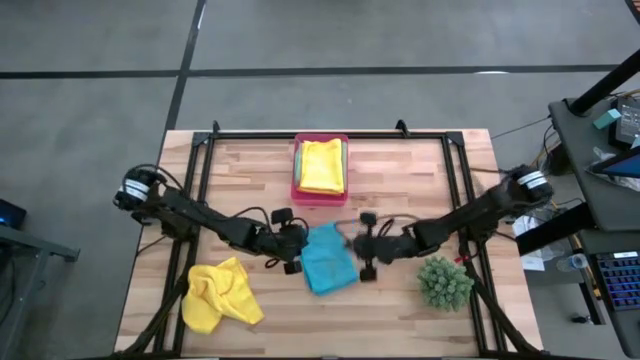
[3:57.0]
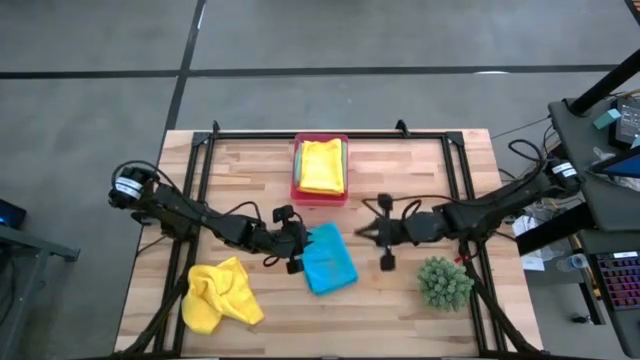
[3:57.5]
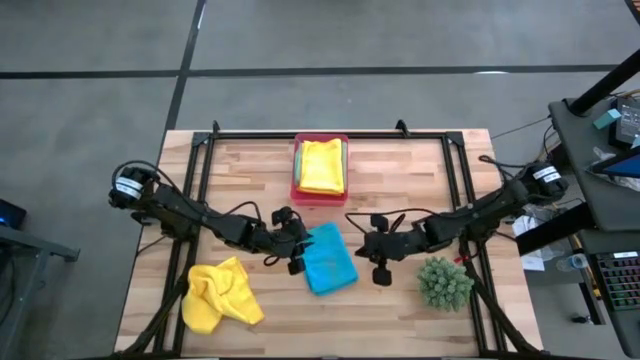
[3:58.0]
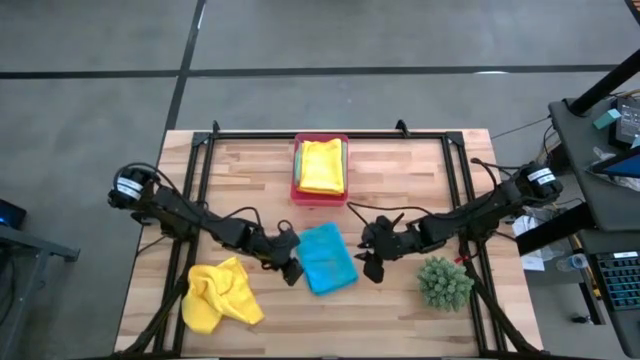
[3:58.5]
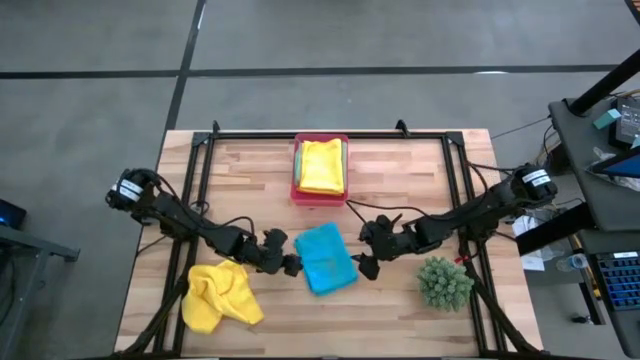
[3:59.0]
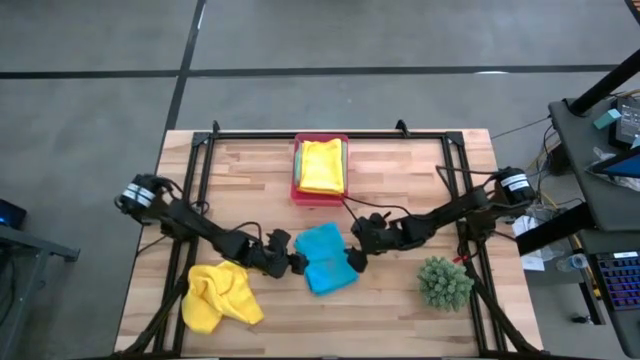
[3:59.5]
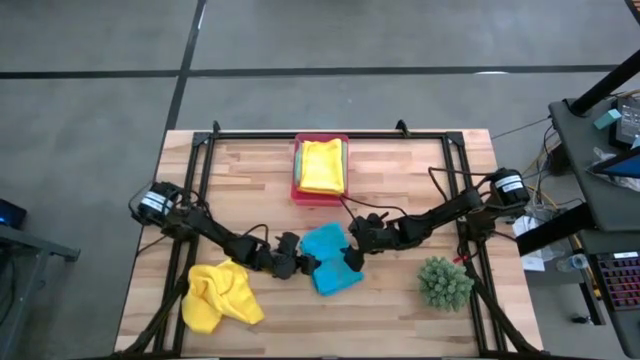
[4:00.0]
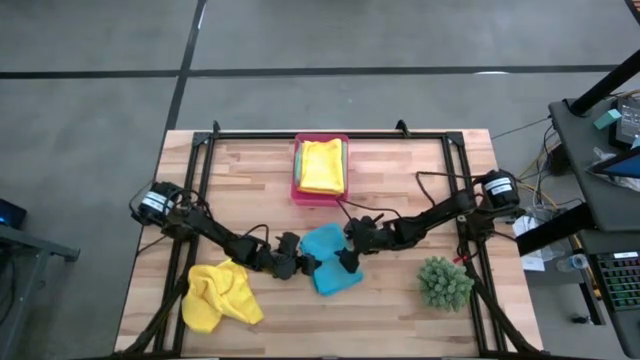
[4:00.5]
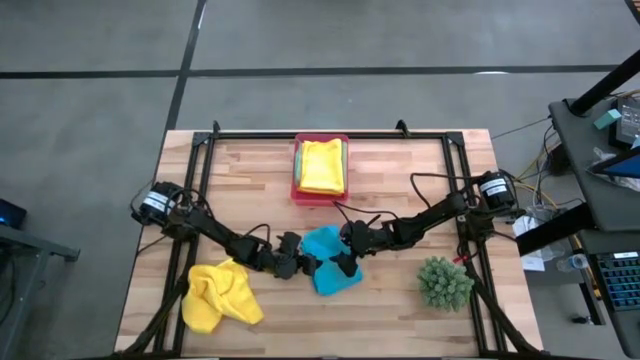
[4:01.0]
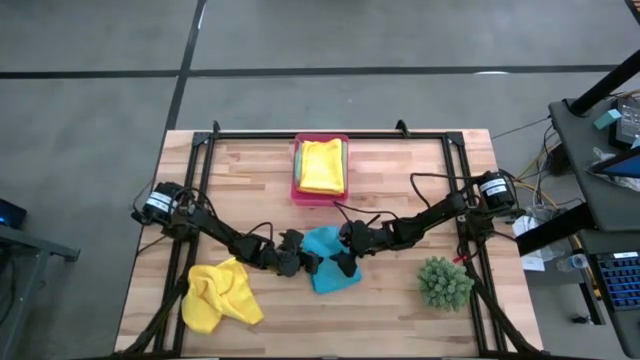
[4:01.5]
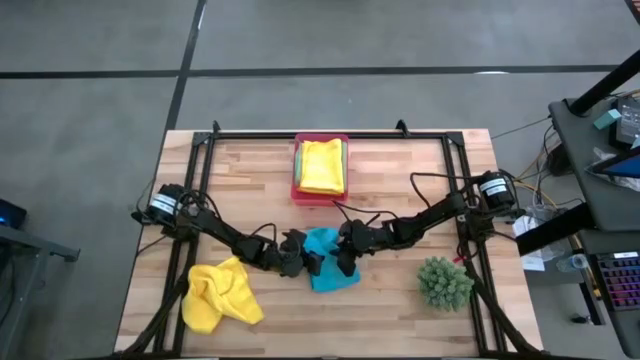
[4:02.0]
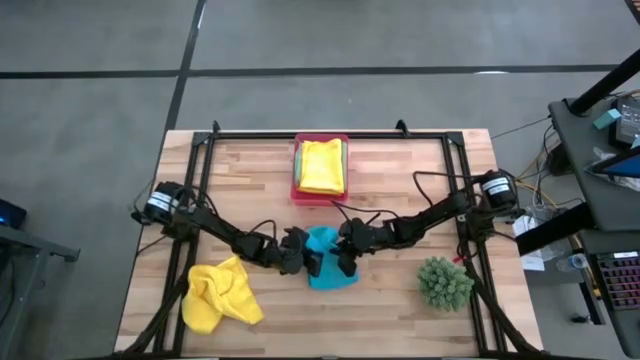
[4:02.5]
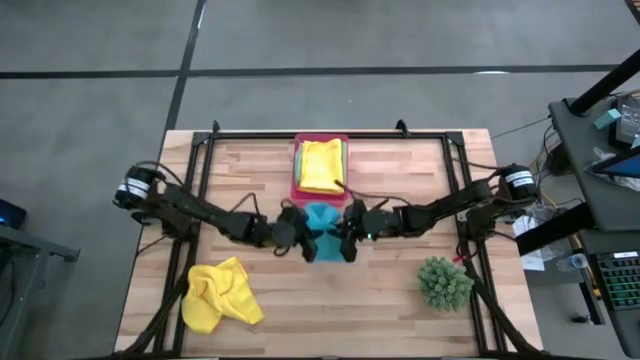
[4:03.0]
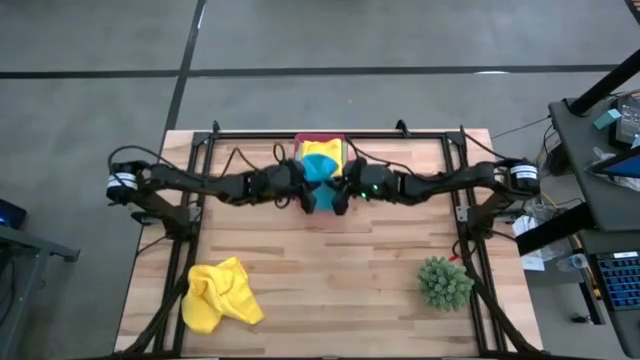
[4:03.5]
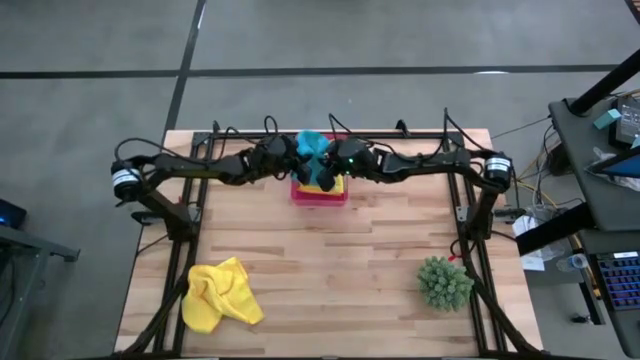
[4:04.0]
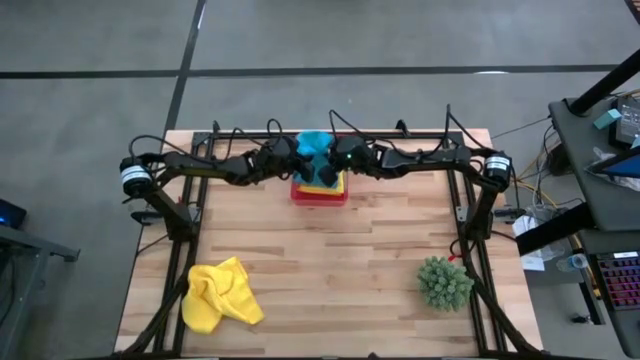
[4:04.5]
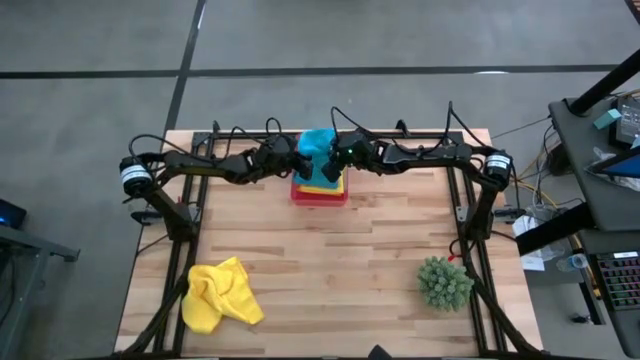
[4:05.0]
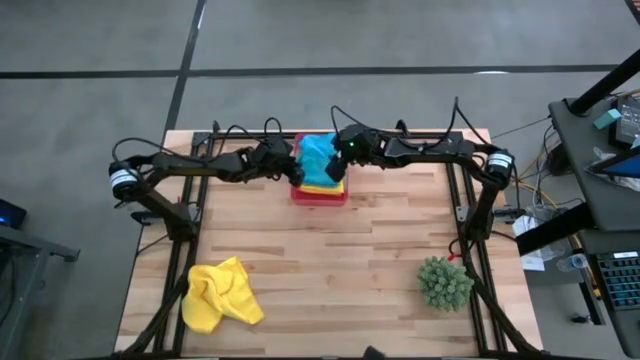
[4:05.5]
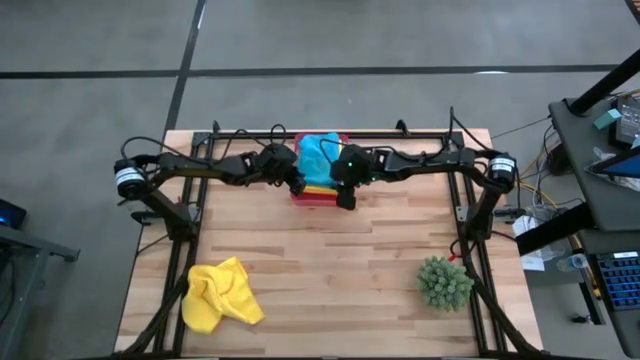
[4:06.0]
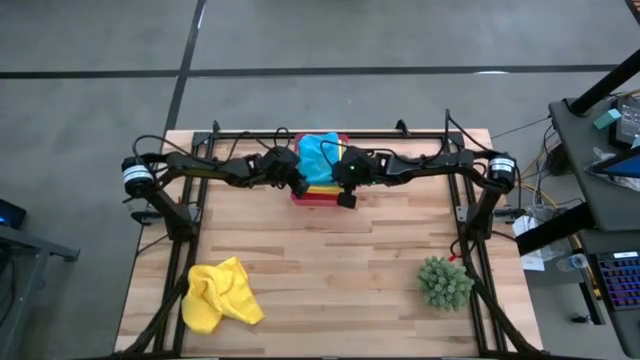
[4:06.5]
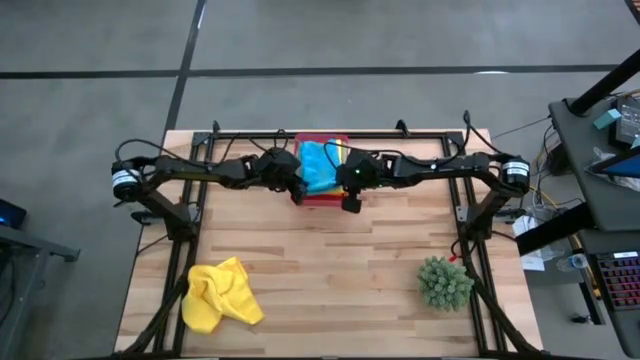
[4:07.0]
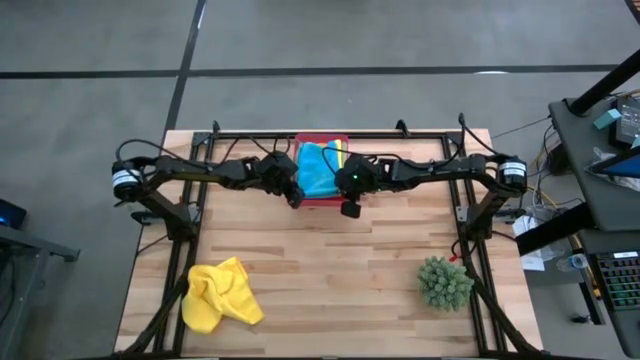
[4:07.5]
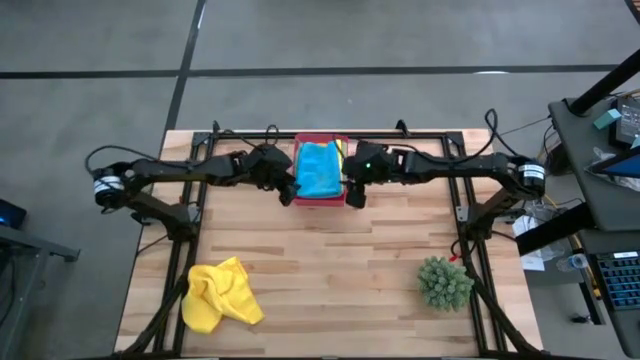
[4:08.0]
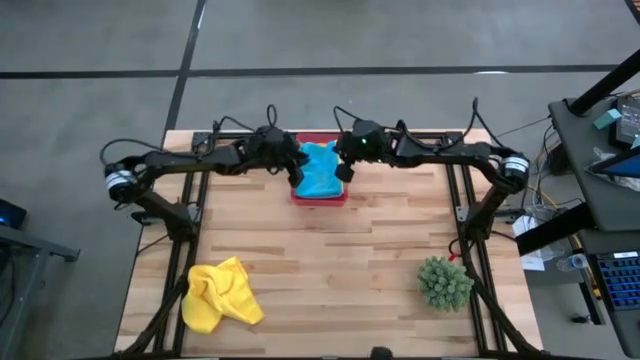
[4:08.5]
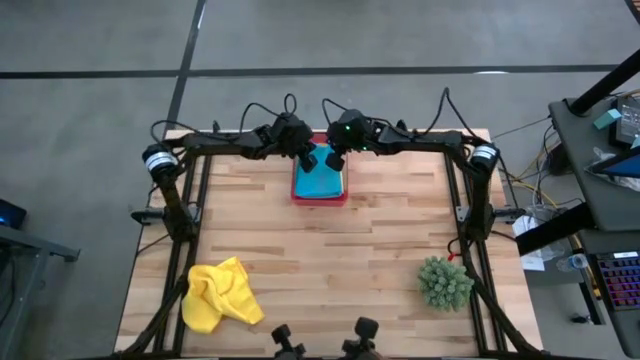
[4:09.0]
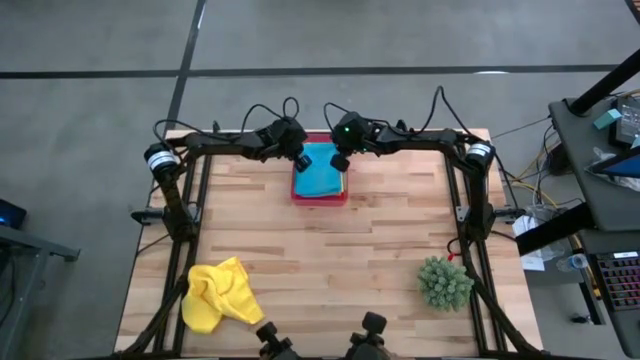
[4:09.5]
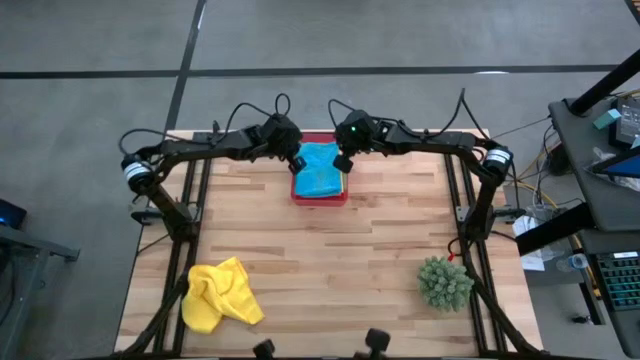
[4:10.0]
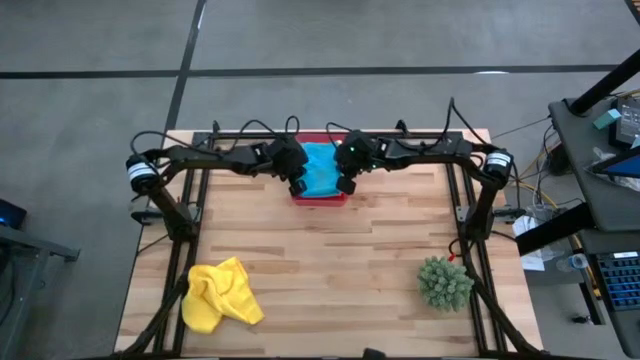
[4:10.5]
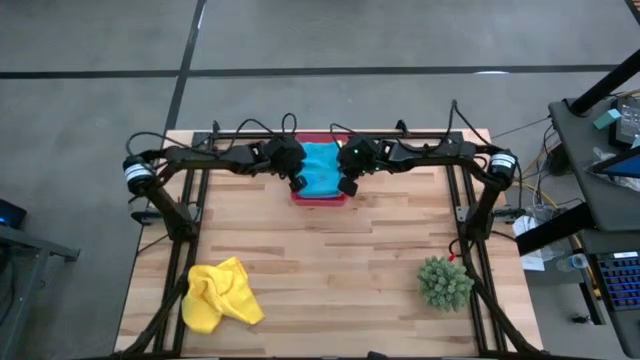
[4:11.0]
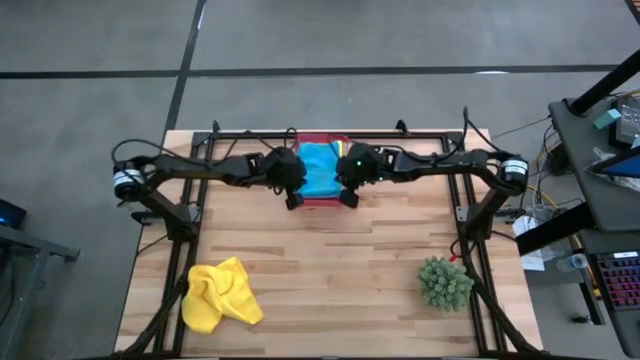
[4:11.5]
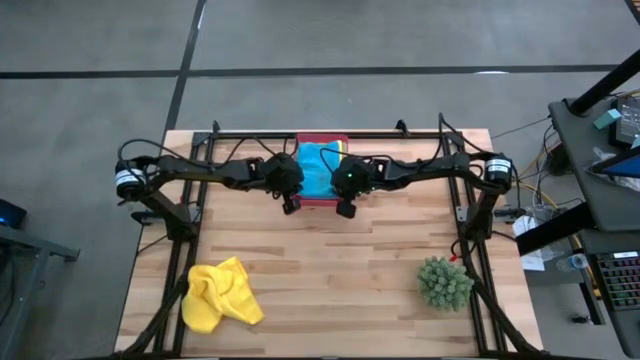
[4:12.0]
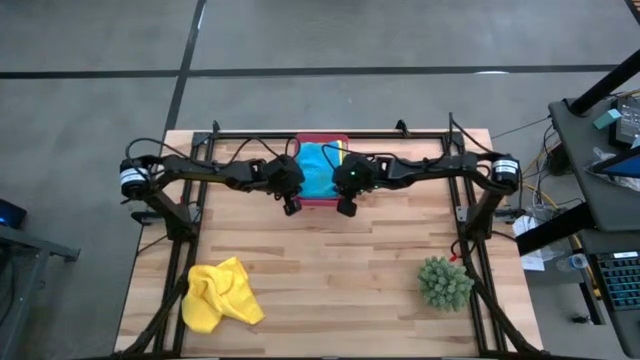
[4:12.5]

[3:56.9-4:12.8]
Task: Fold microfiber towels
Put the blue towel into the bin
